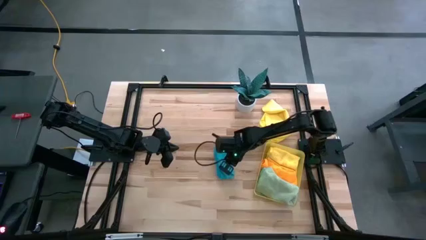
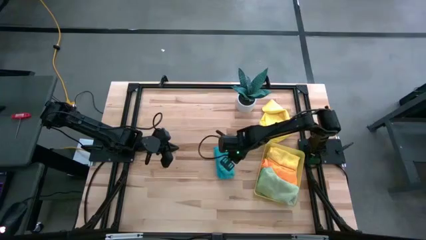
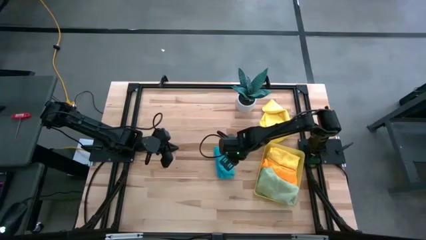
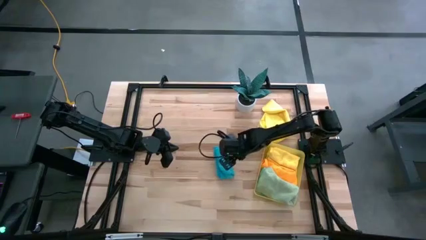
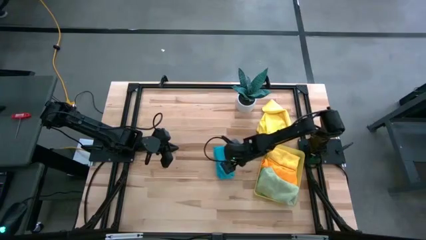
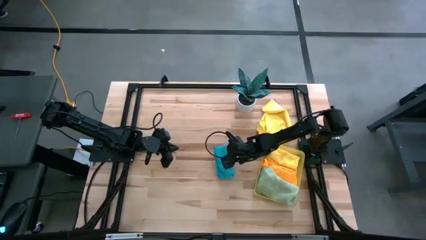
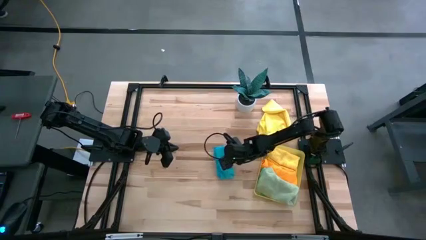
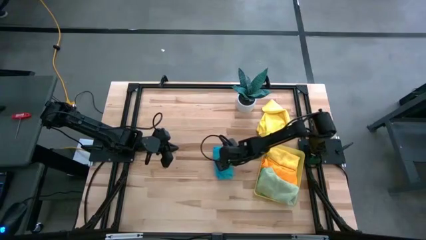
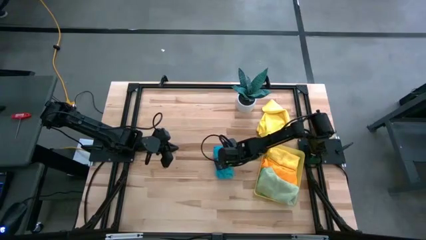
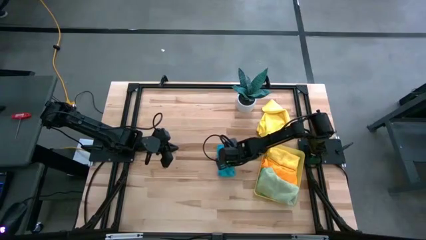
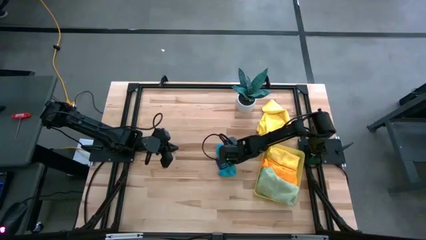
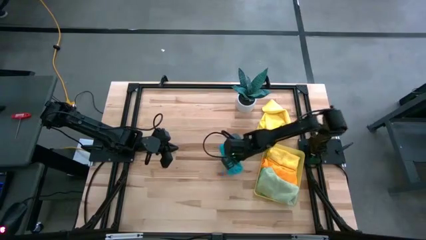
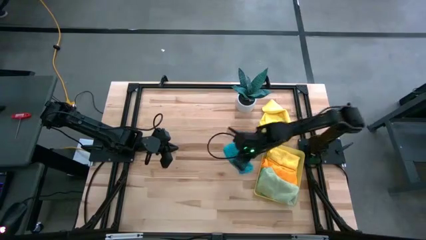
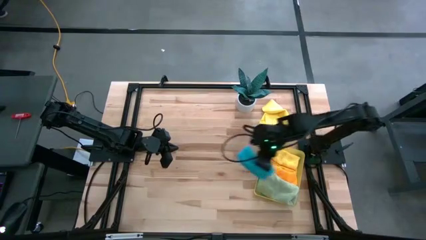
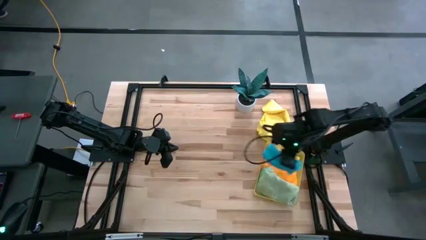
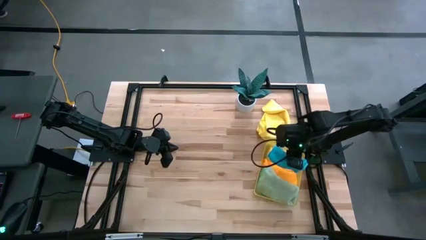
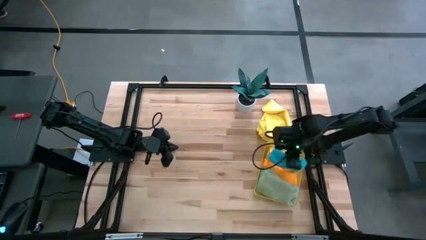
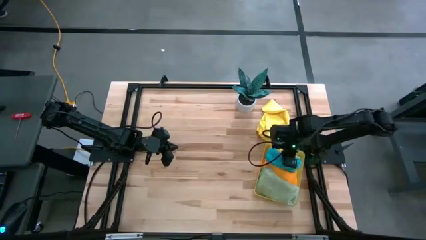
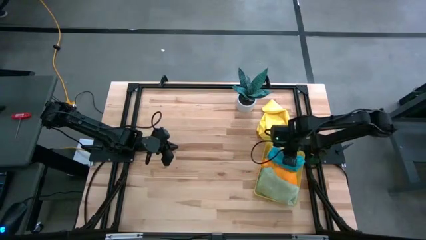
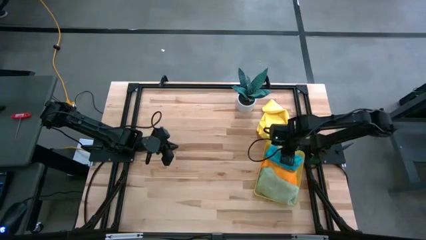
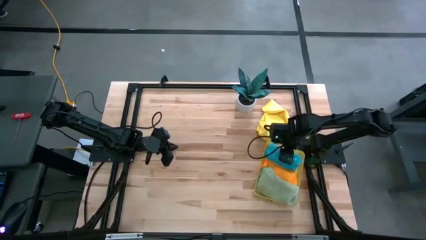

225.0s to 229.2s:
Task: Fold microfiber towels
Put the blue microfiber cloth into the yellow bin

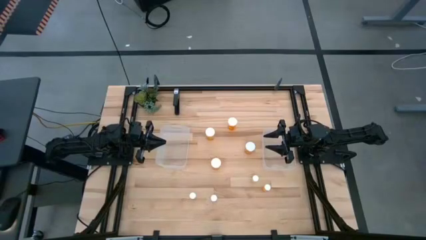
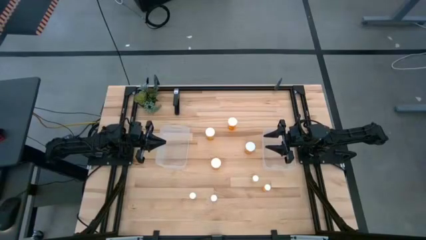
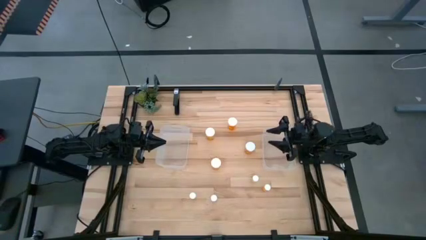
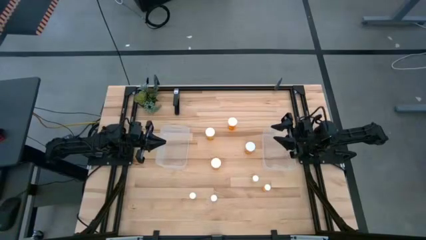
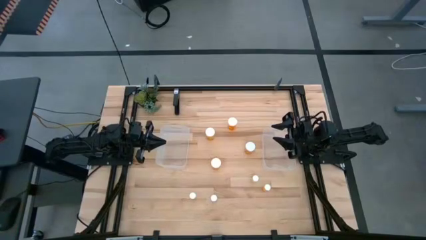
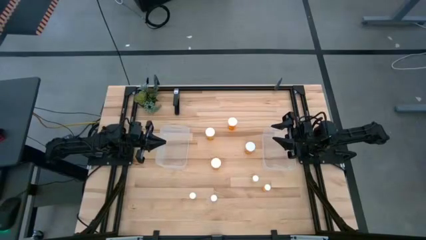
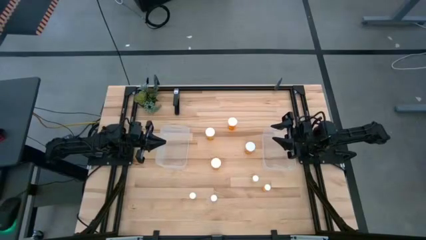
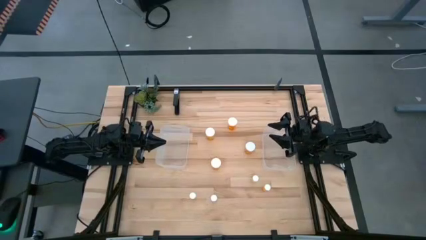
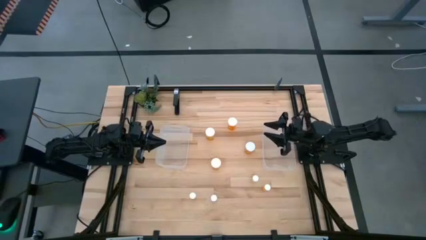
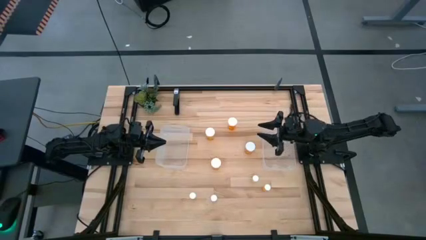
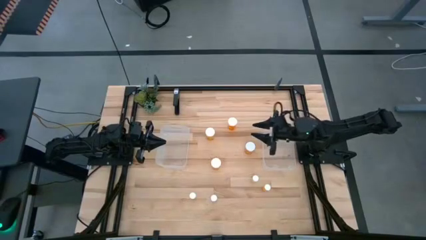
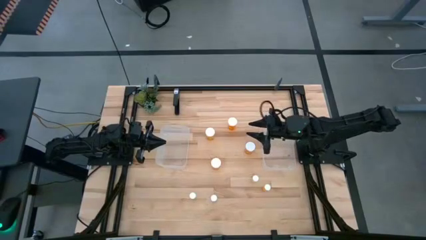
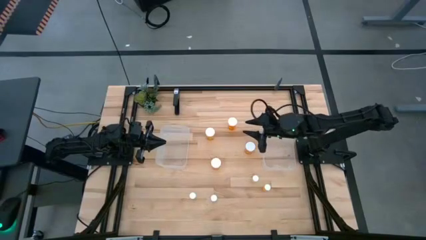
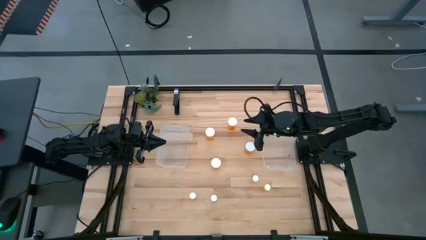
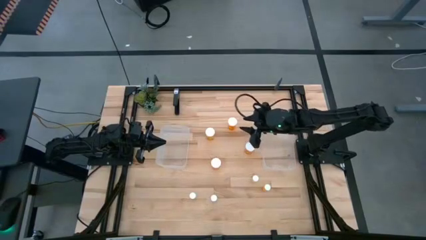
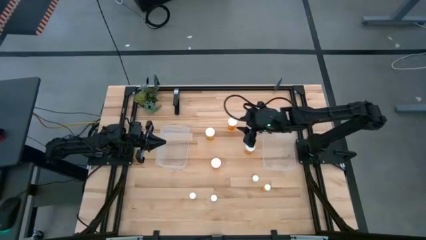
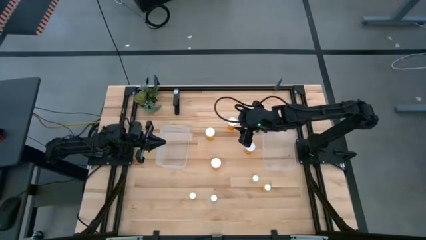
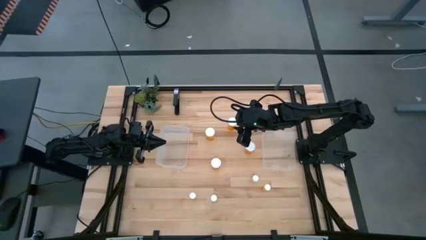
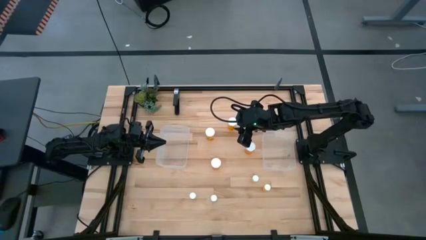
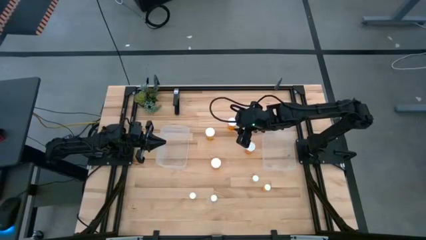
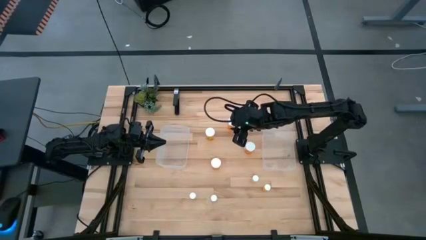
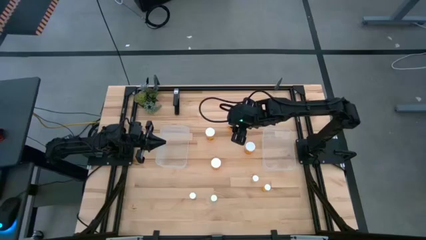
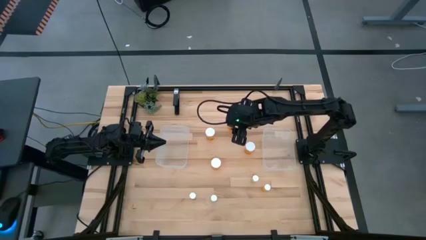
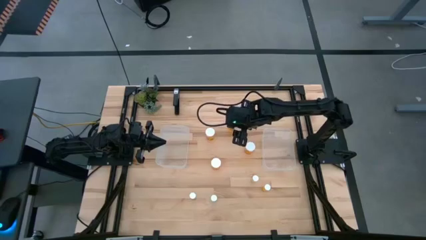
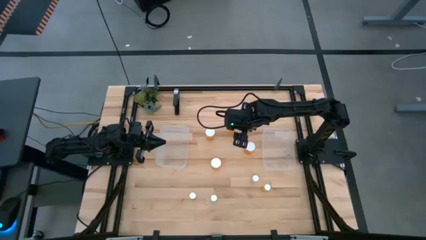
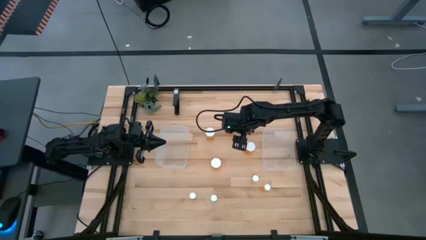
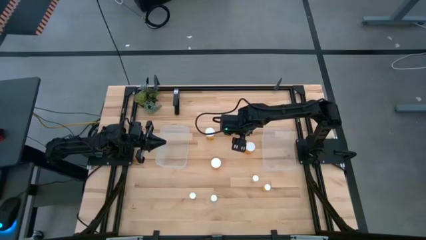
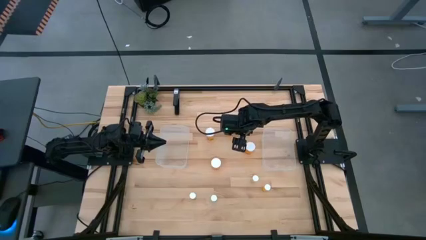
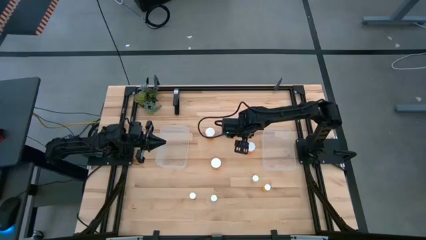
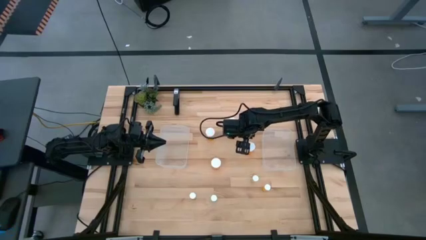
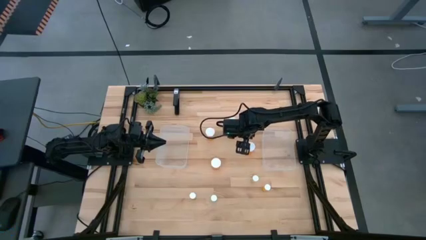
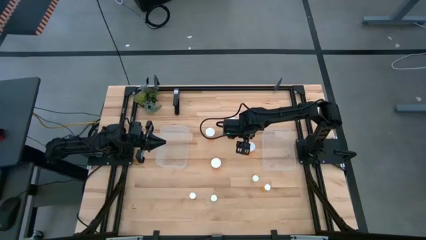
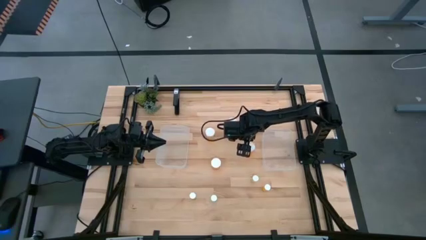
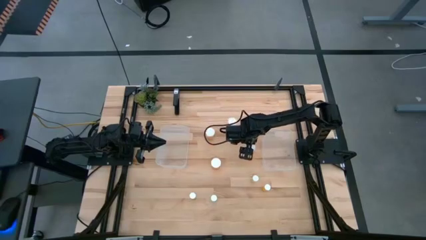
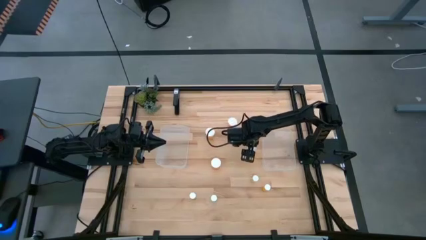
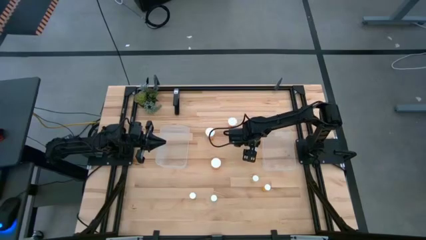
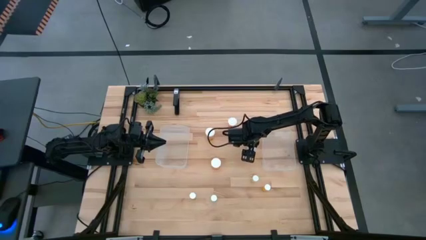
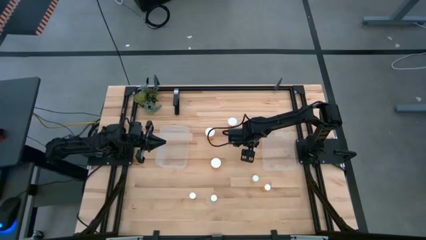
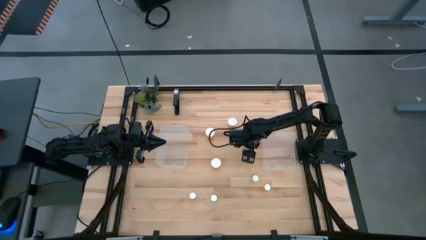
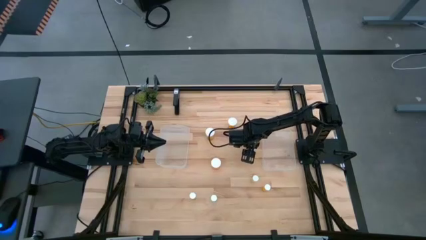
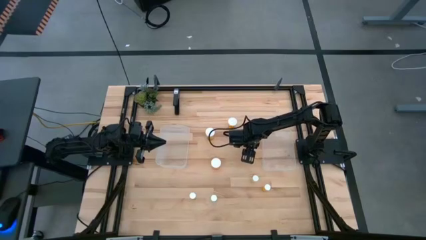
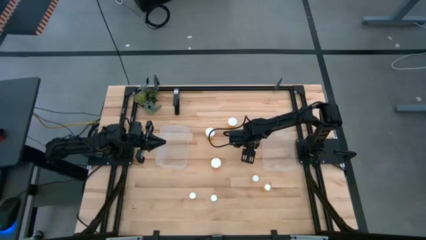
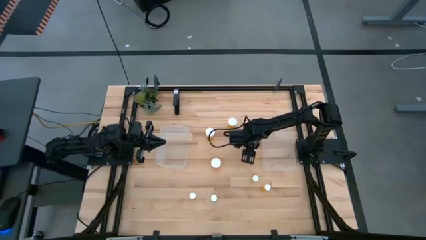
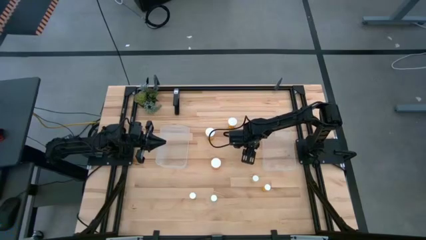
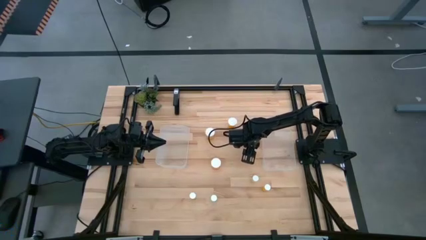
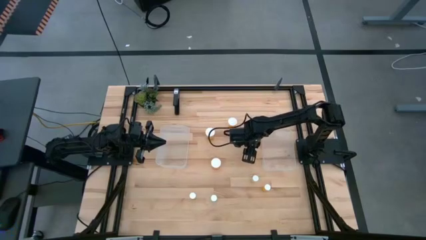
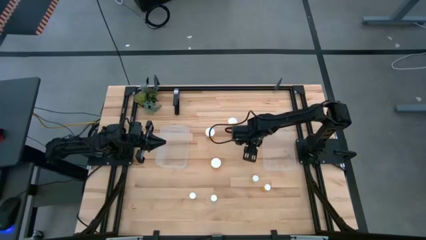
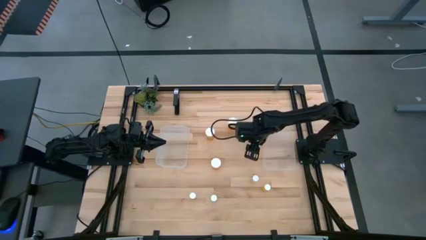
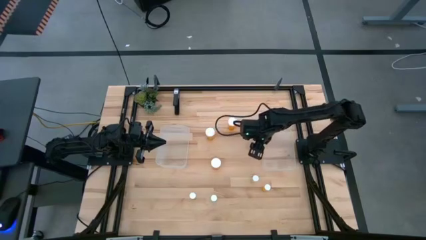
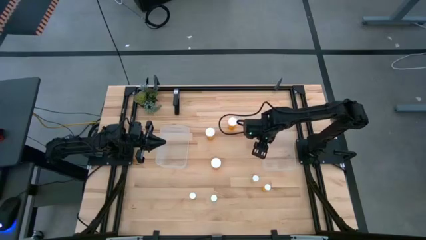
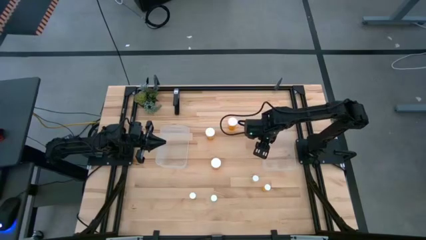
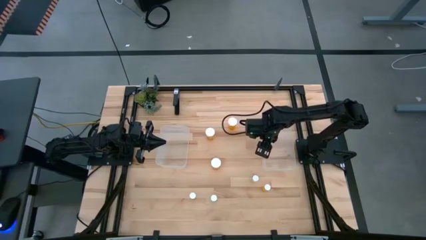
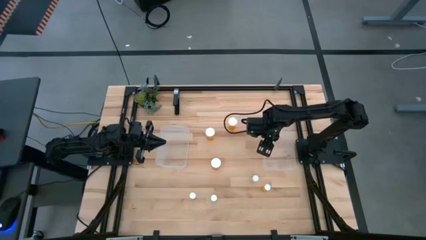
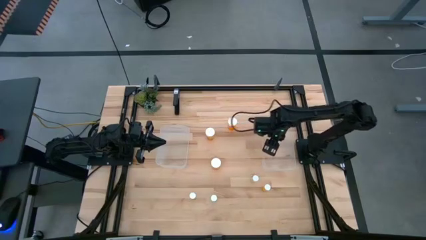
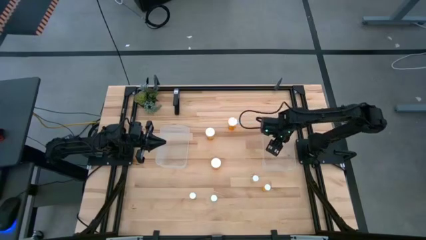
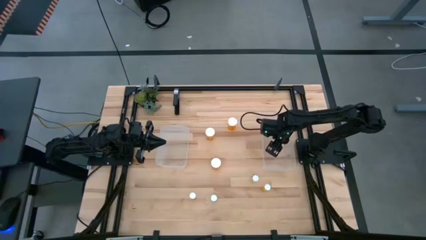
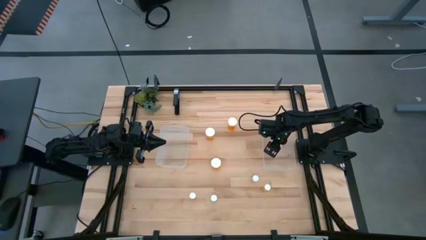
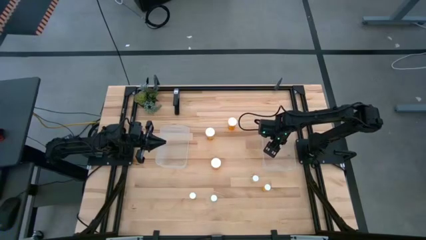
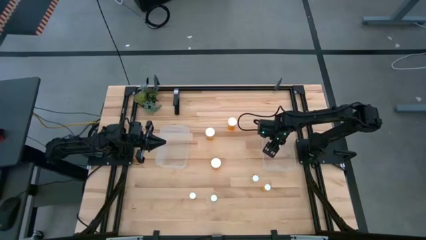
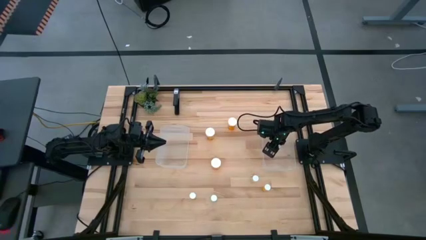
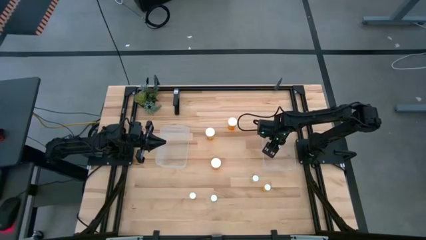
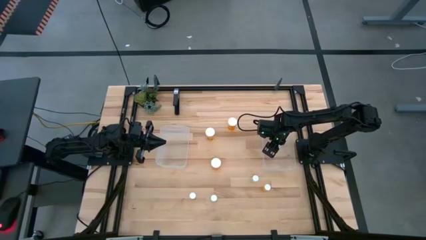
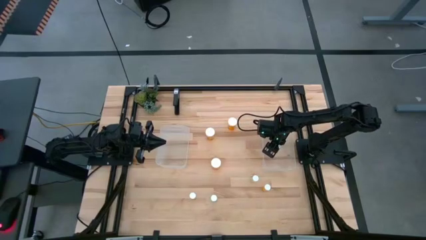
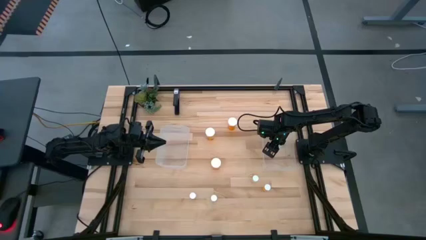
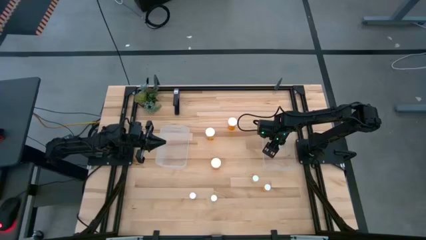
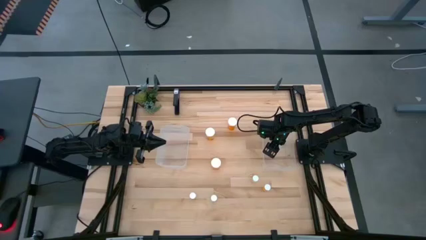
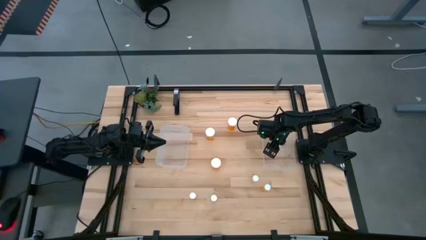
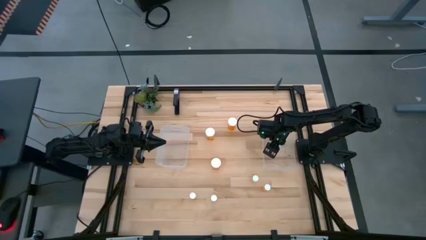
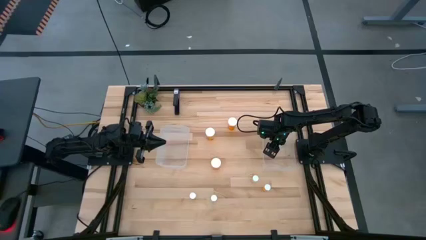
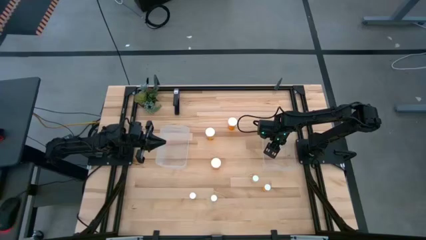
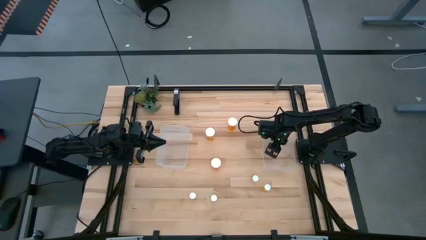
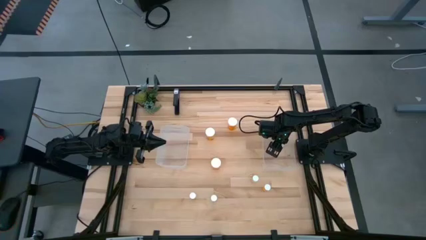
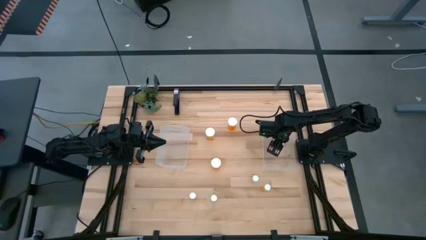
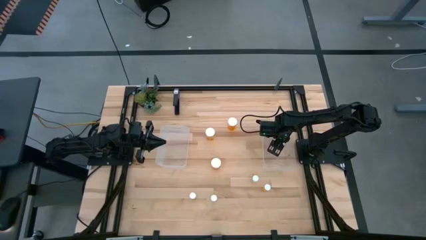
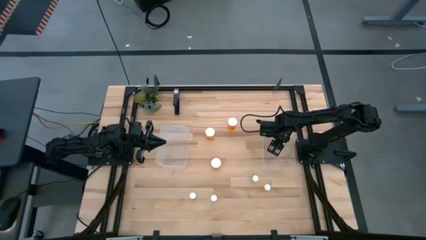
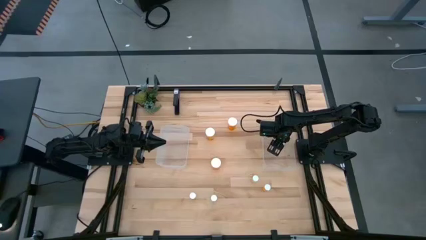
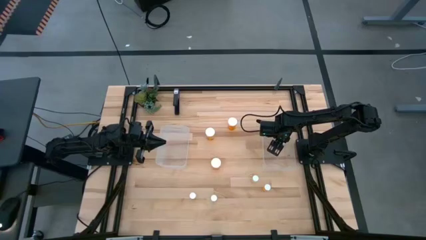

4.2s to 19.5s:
Task: Pick and place medicine bottles into bin by pill shape (circle, oval)
Put the middle right large orange pill bottle into the right transparent bin
